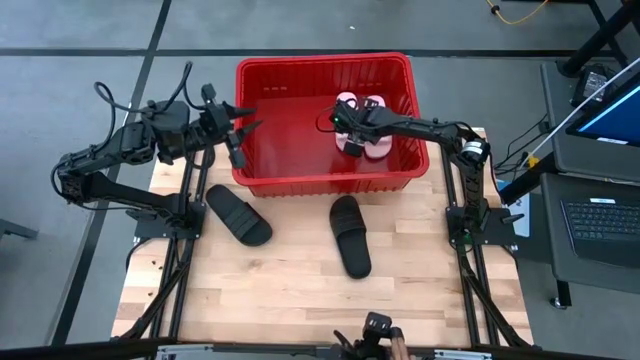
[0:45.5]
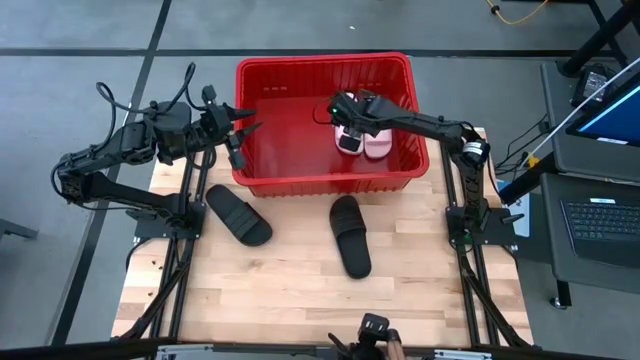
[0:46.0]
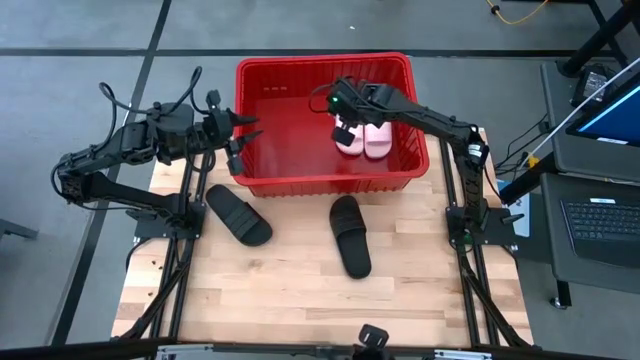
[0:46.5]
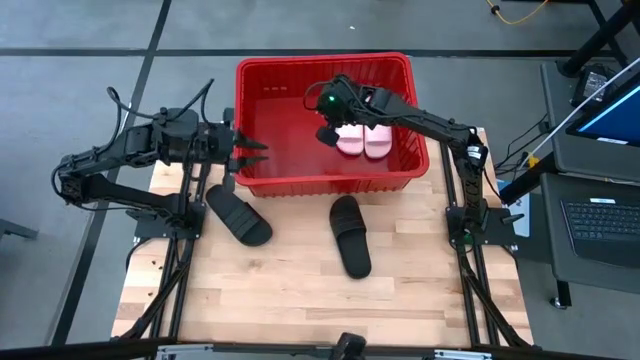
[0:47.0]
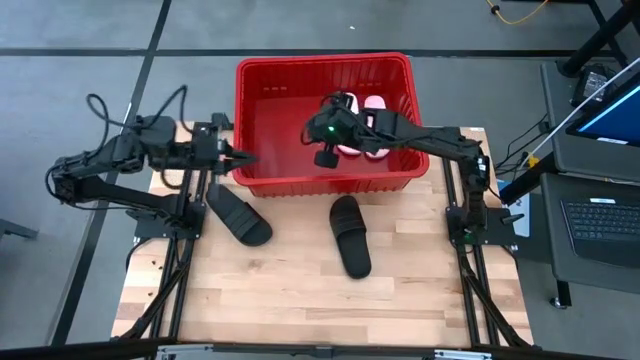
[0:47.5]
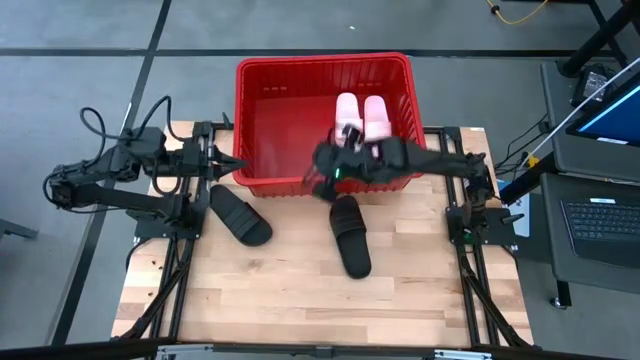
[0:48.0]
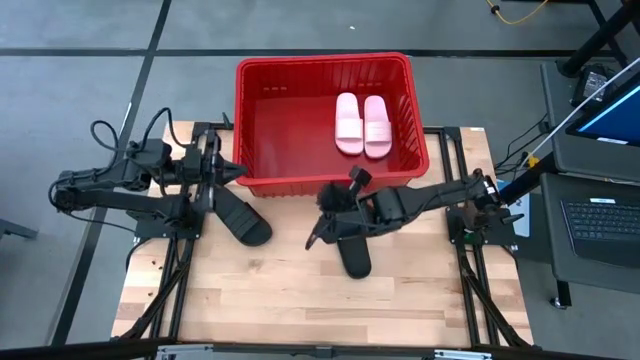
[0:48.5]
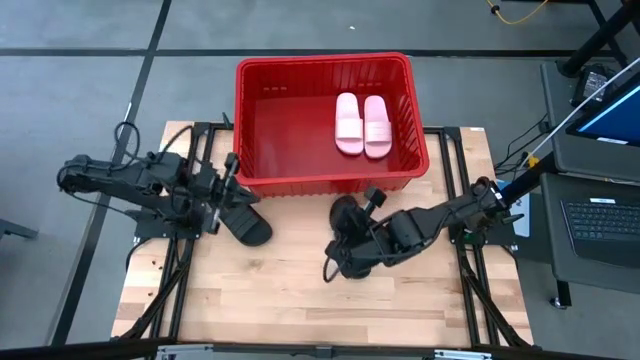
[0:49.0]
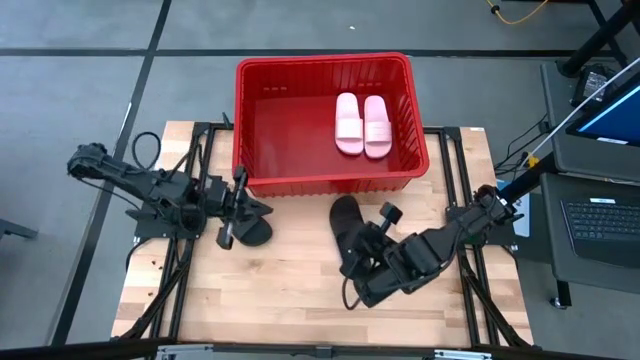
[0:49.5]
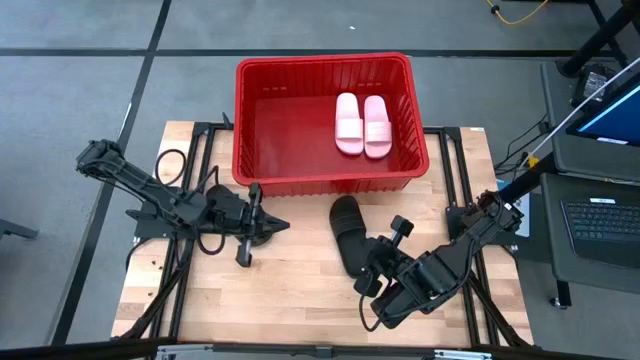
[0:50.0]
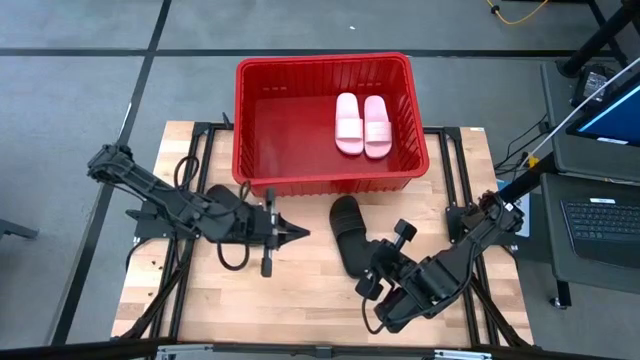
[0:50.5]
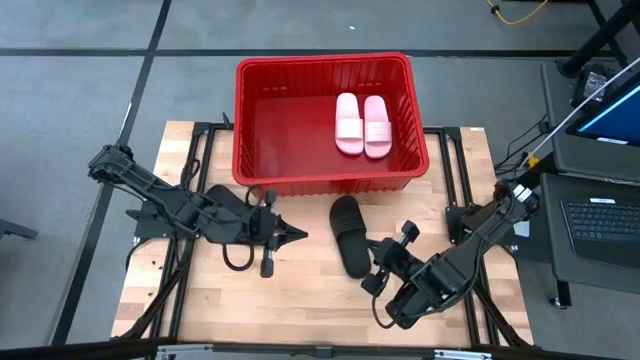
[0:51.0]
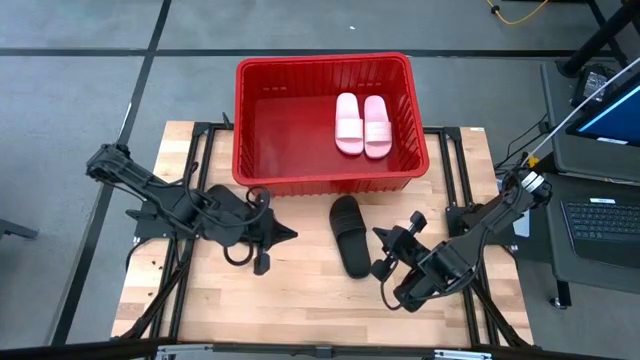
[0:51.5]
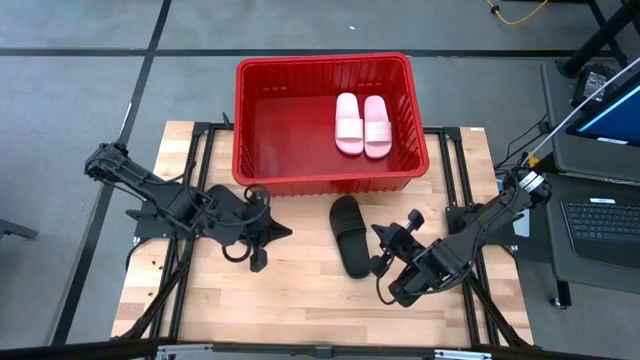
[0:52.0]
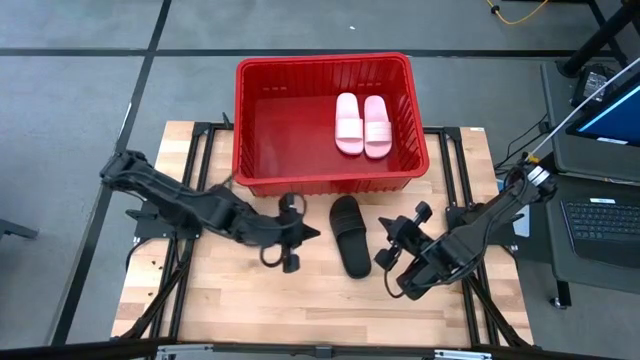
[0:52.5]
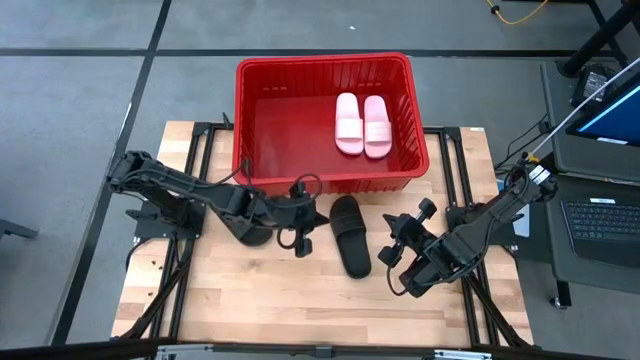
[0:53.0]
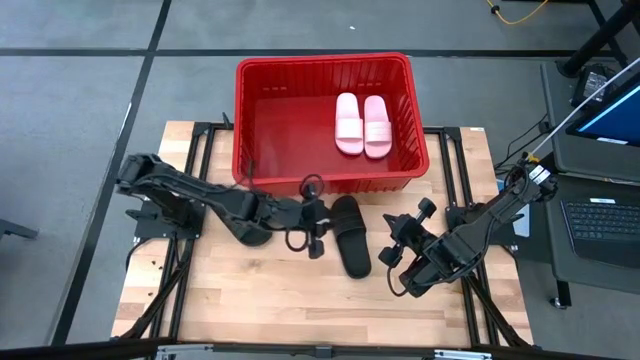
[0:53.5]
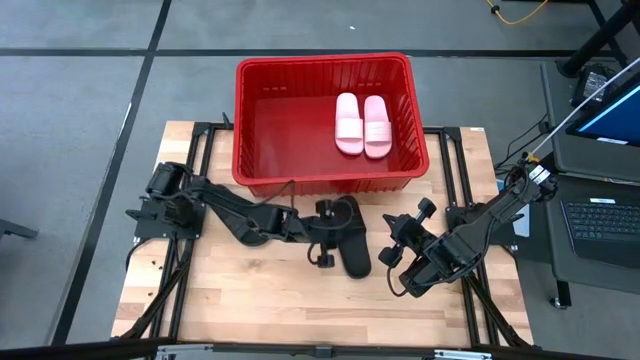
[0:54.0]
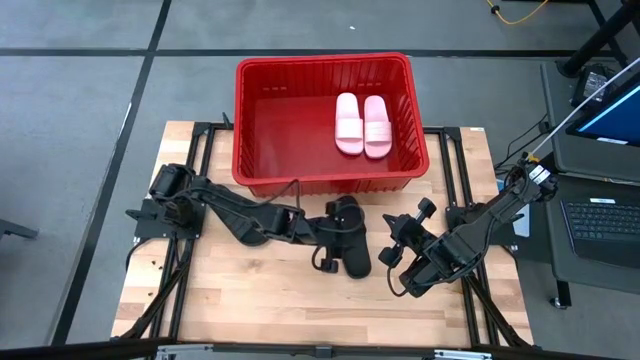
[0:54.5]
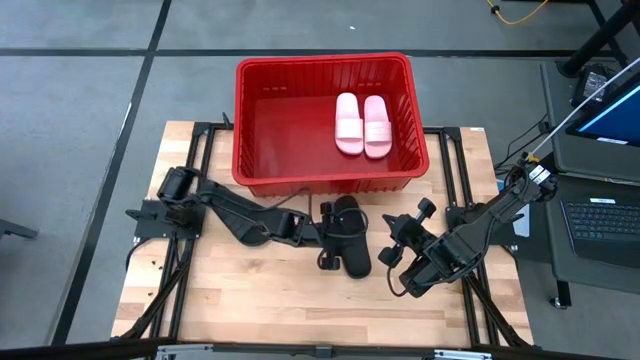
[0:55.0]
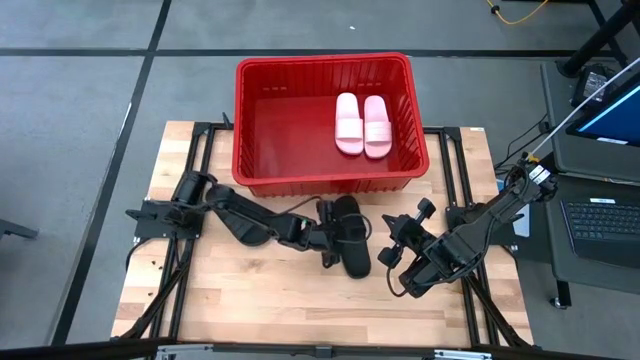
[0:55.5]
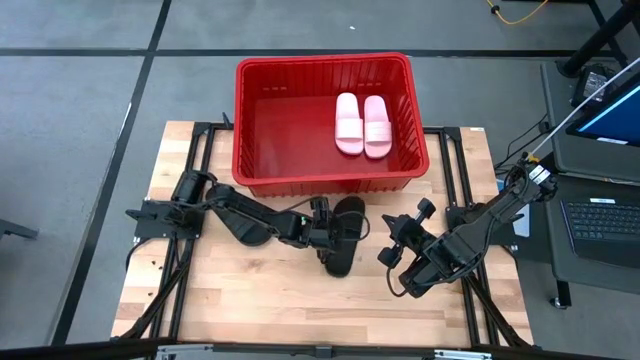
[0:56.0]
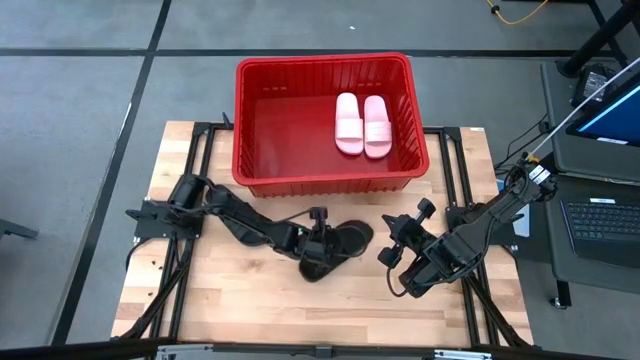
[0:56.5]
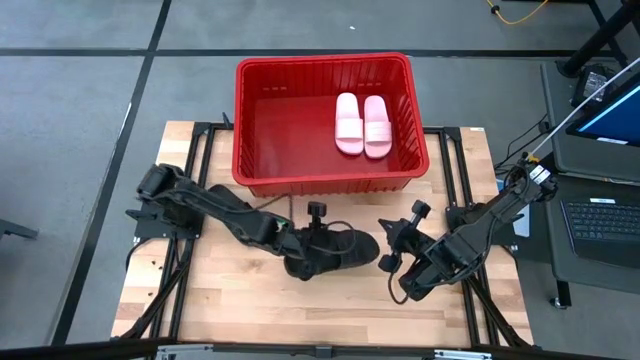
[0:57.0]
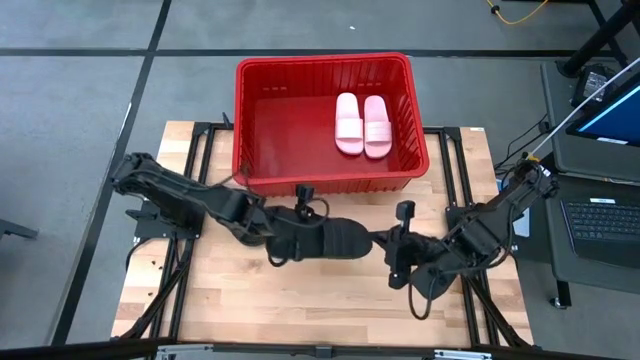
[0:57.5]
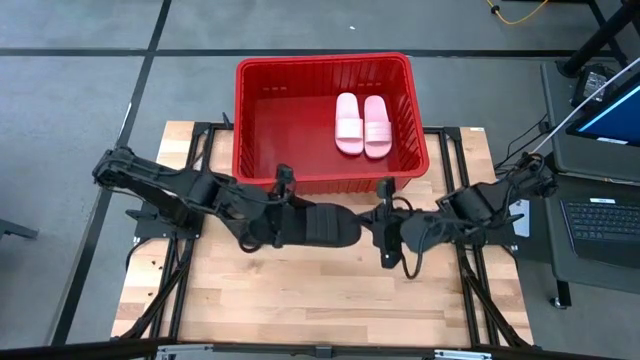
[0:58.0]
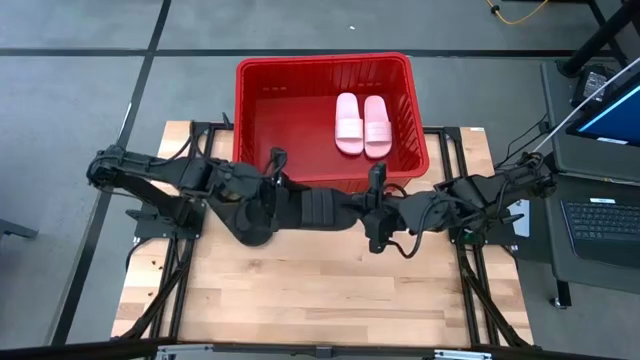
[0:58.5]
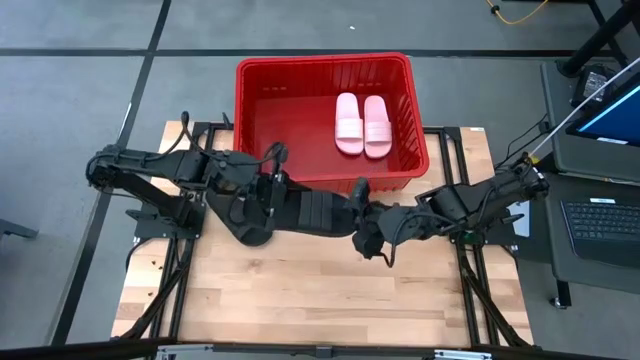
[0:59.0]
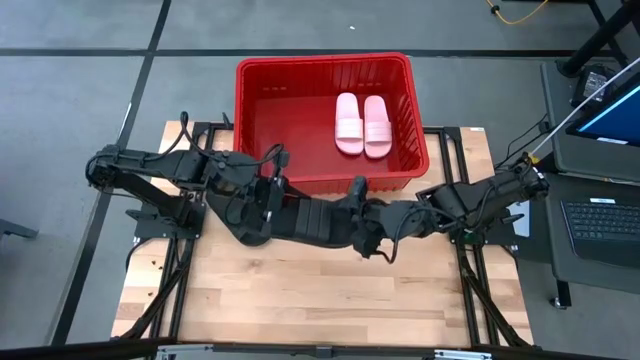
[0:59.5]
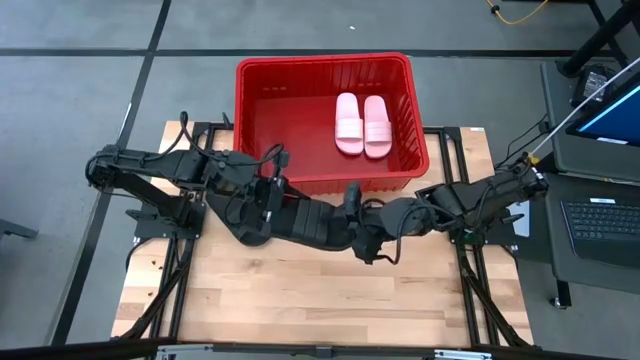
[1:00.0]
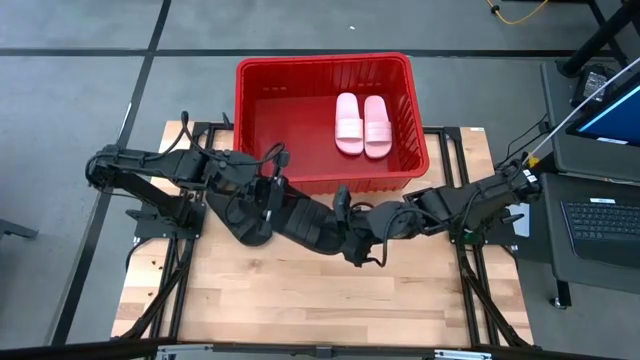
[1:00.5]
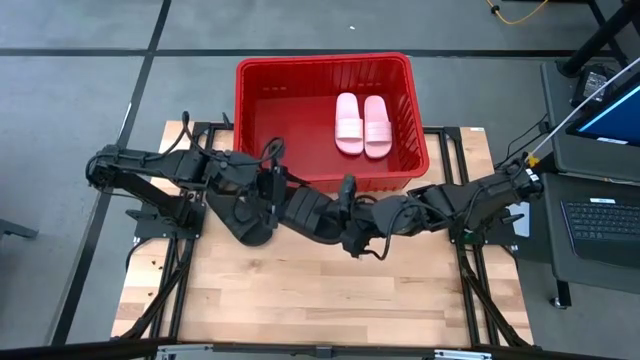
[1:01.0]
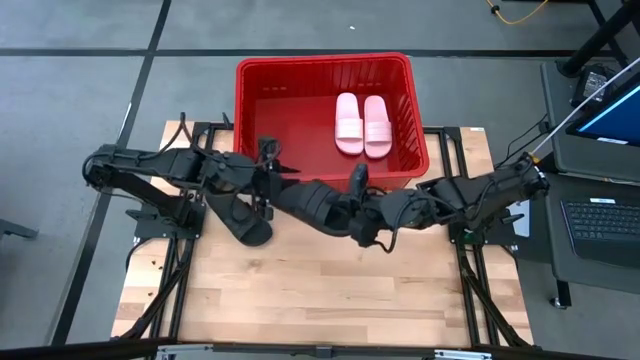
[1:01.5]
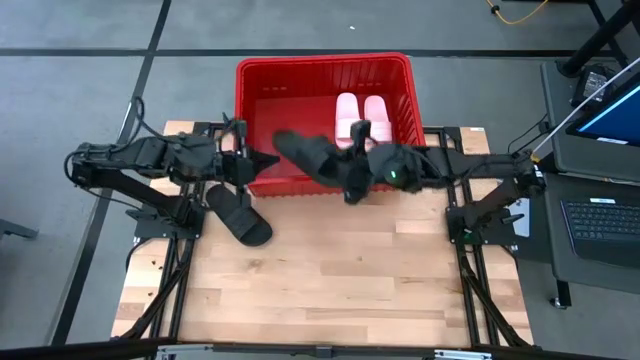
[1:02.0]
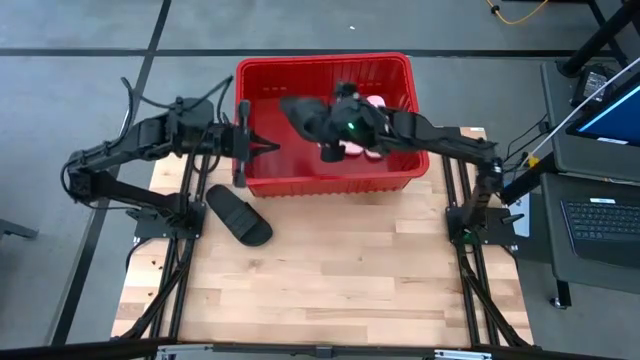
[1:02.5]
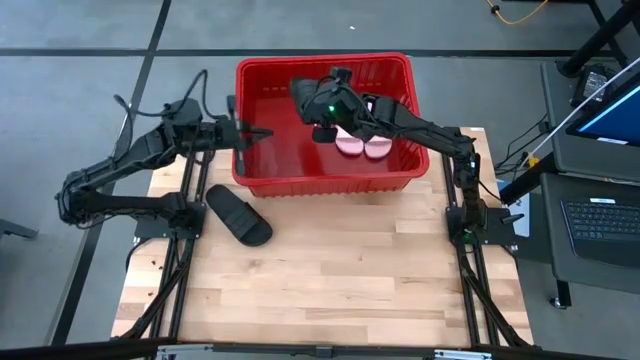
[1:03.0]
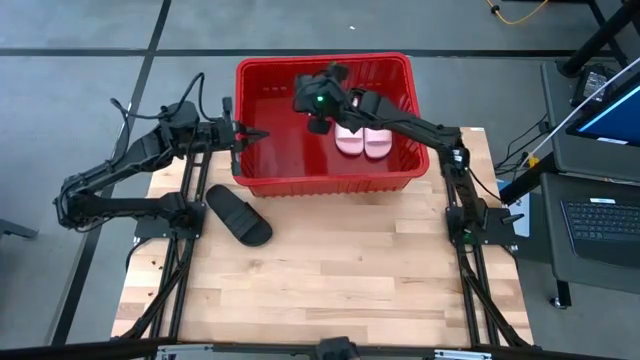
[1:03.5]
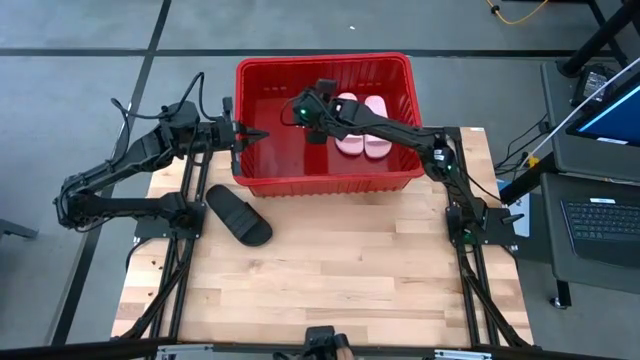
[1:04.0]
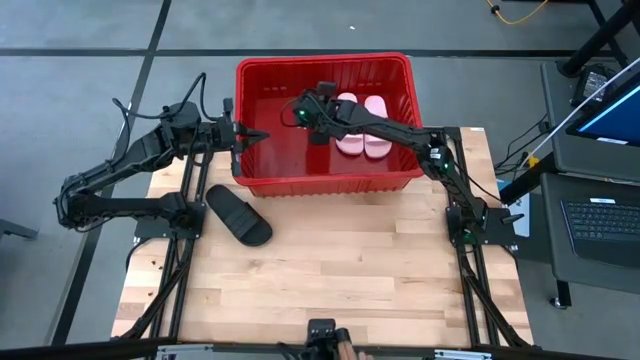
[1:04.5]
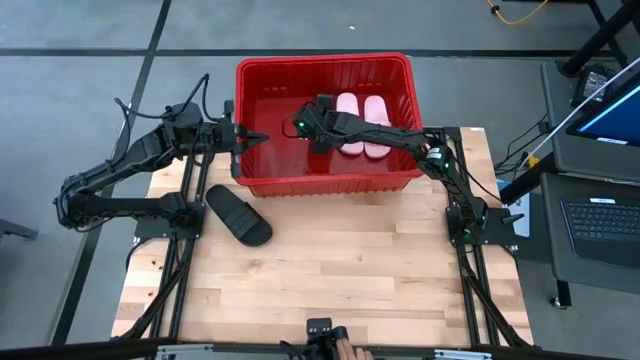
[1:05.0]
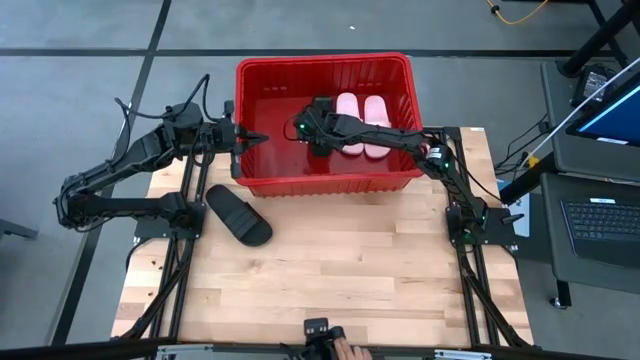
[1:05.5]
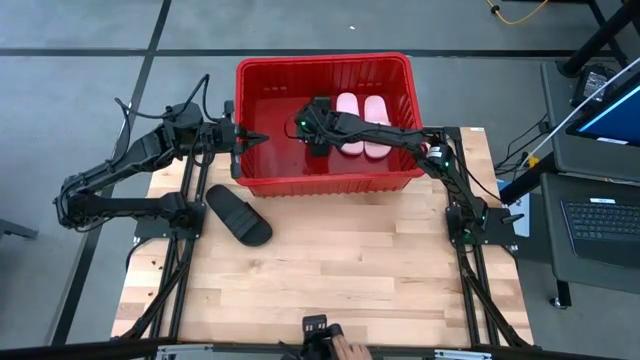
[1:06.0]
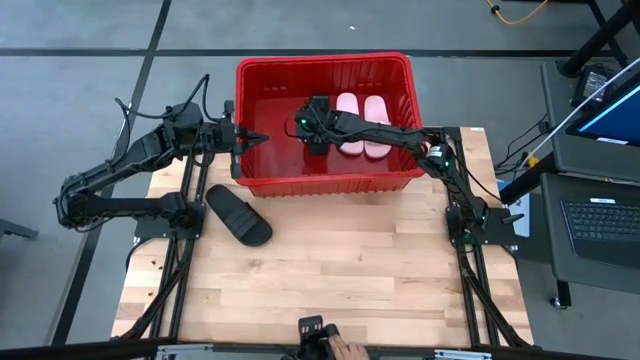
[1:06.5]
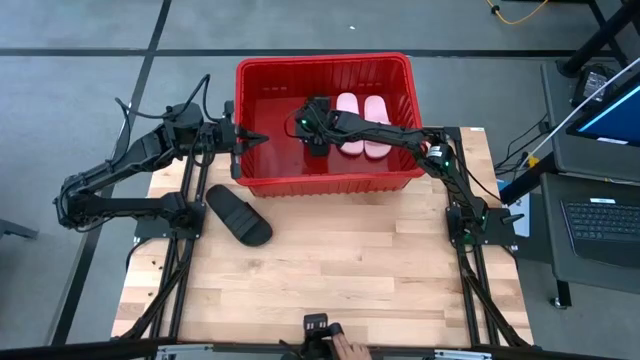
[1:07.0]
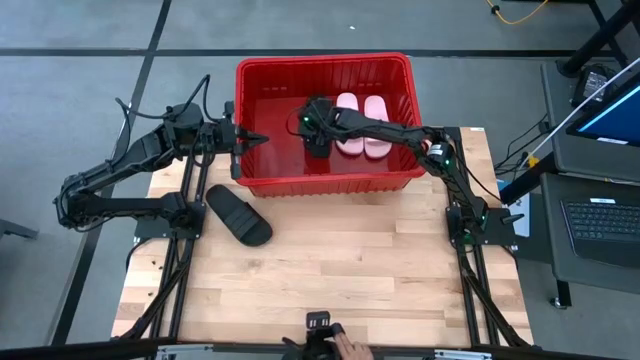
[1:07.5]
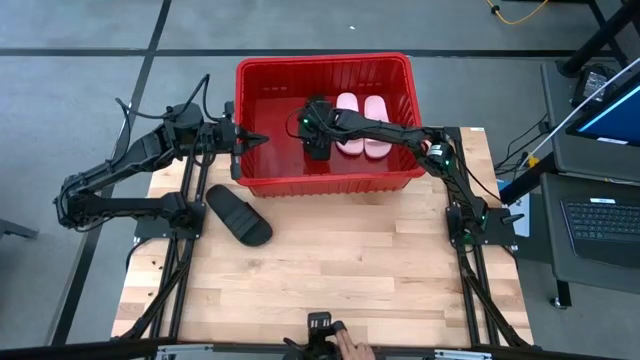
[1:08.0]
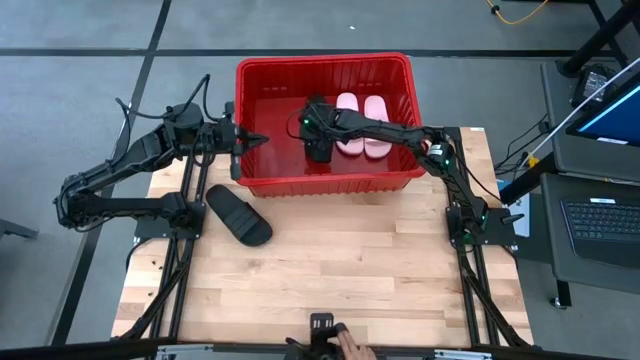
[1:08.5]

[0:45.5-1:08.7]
Task: Pick and place slides into bin
Put the right black slipper into the red bin
